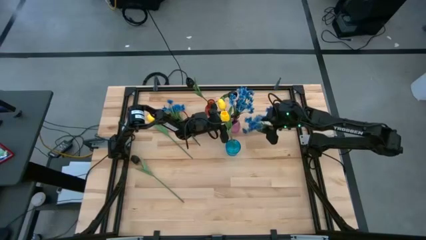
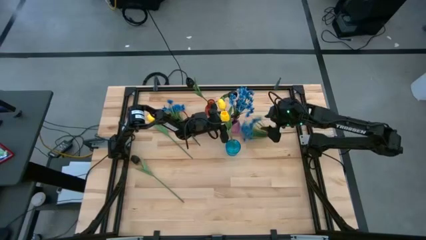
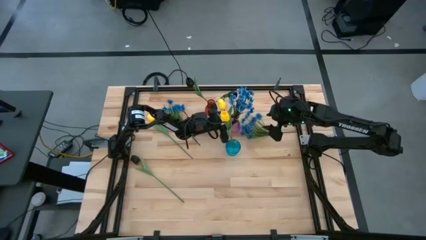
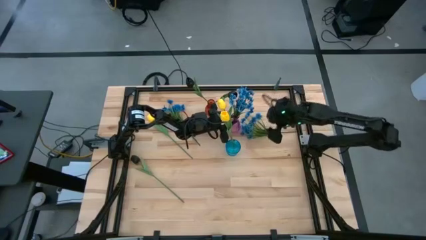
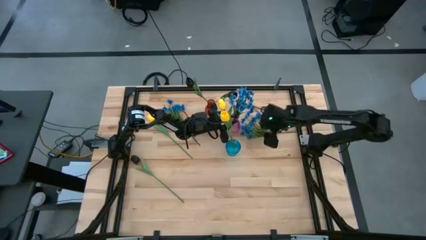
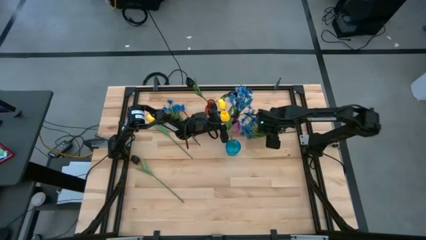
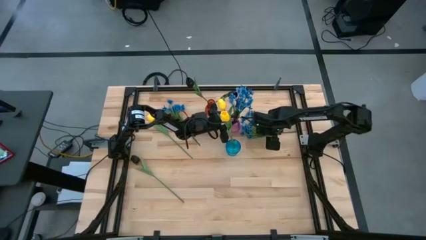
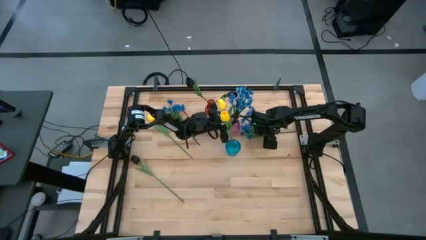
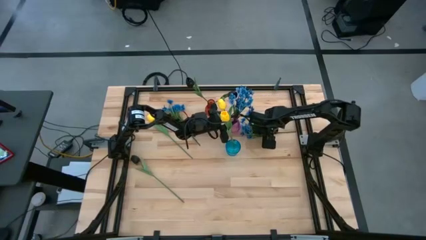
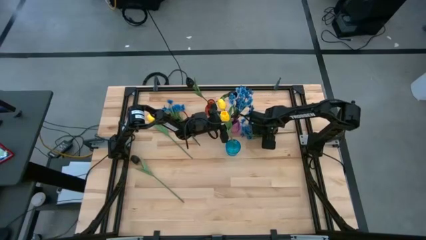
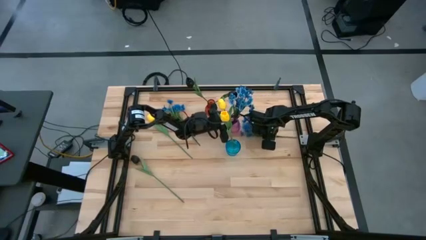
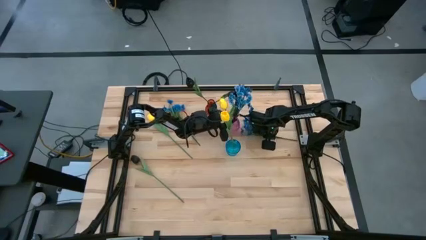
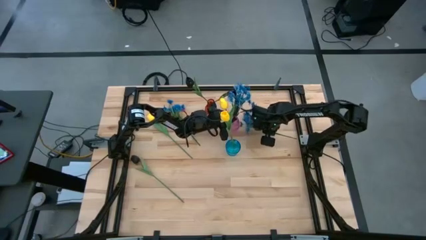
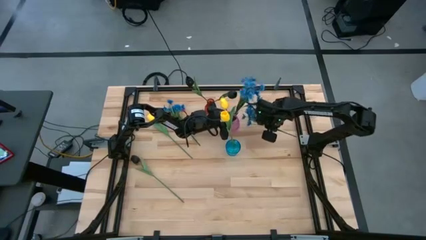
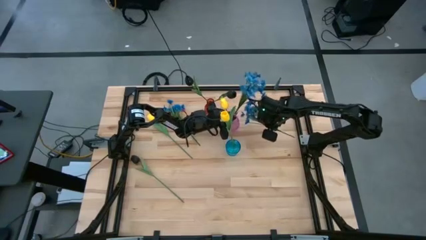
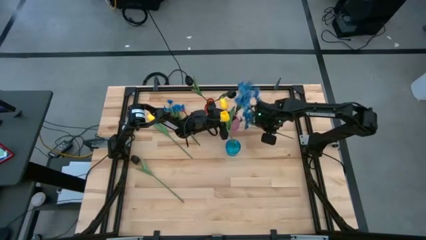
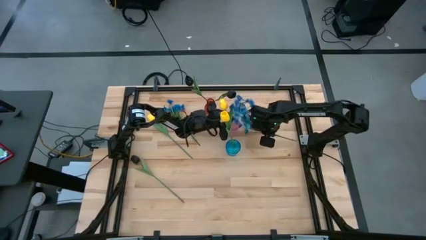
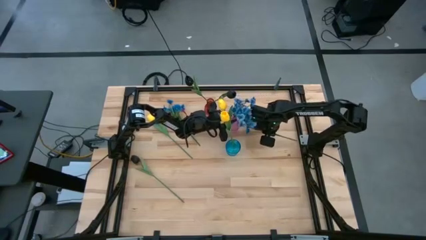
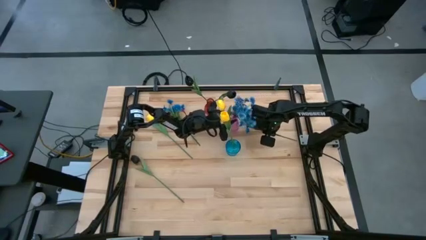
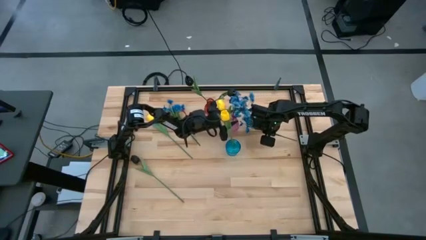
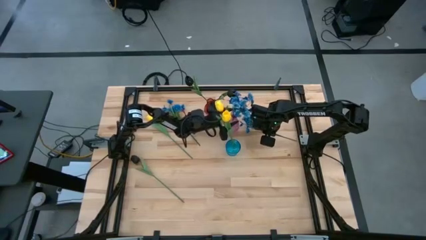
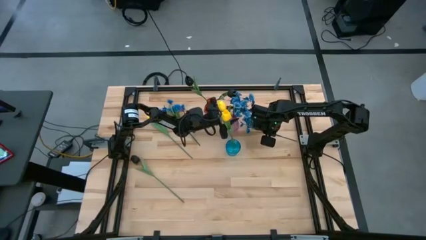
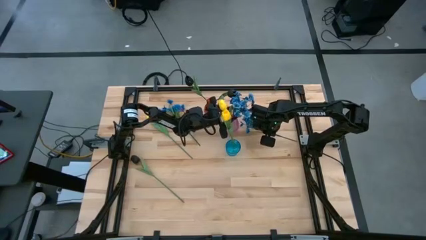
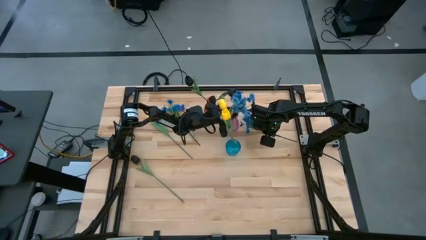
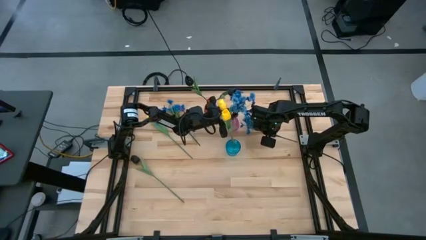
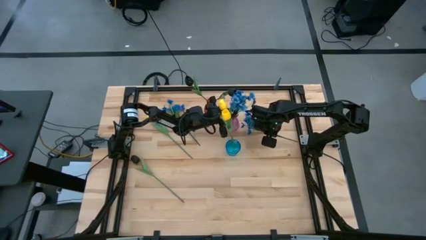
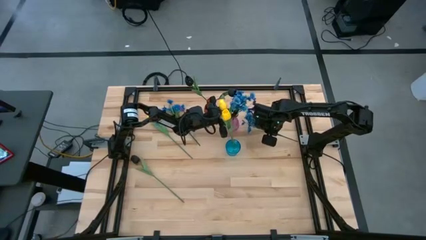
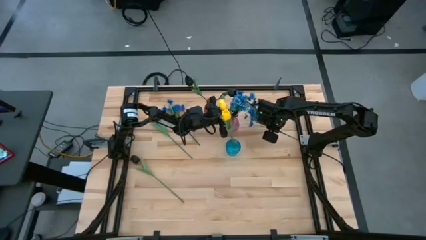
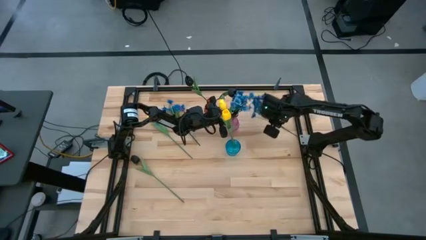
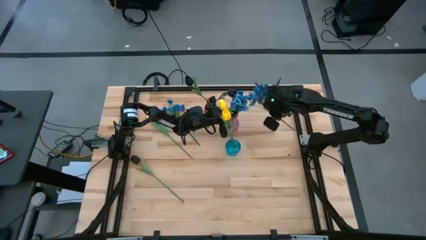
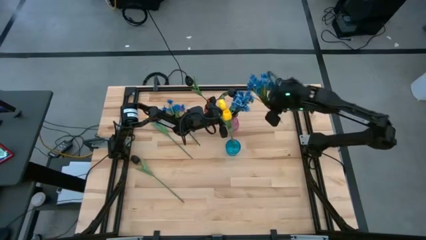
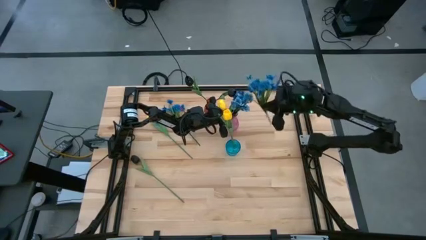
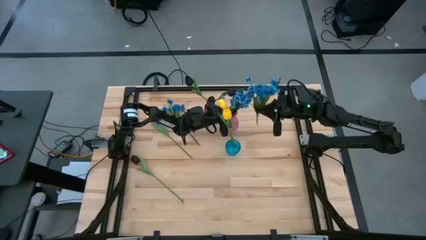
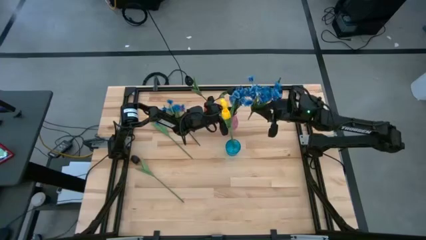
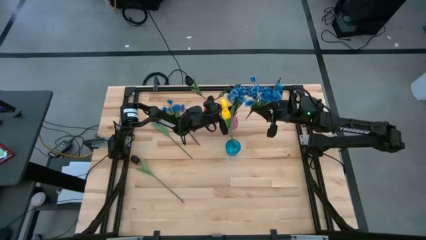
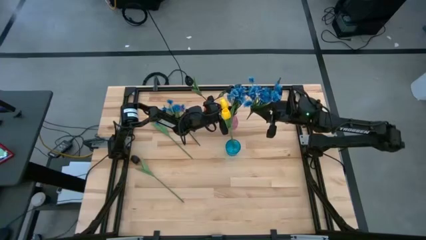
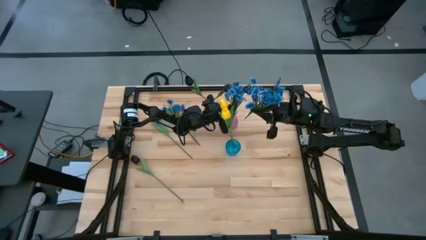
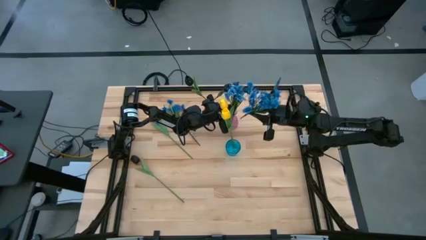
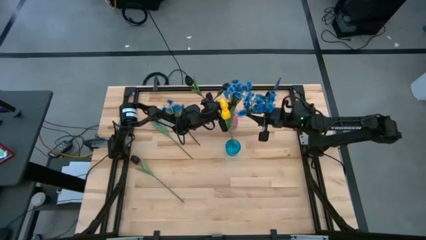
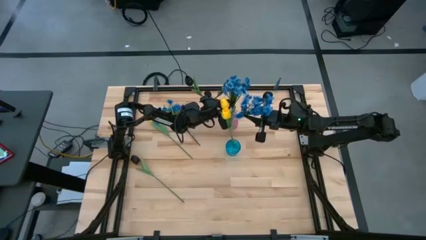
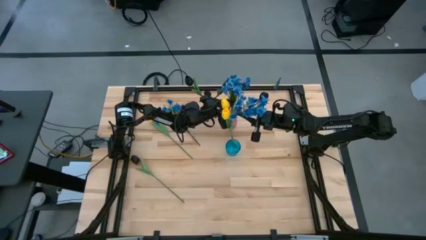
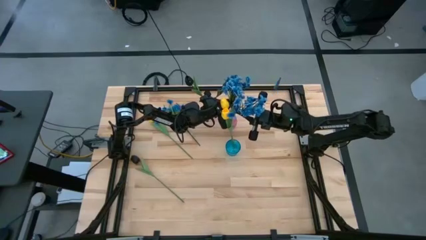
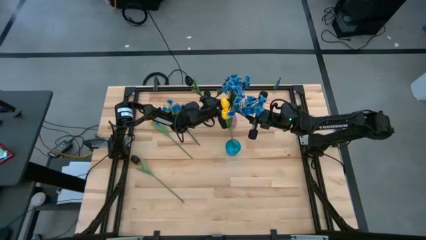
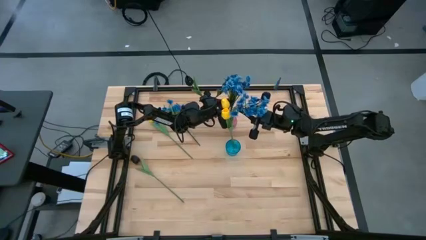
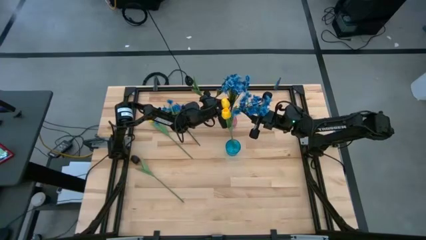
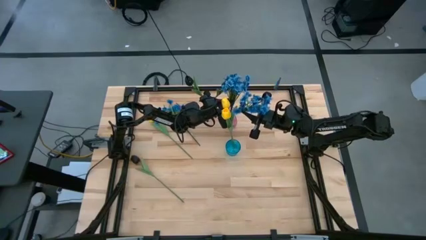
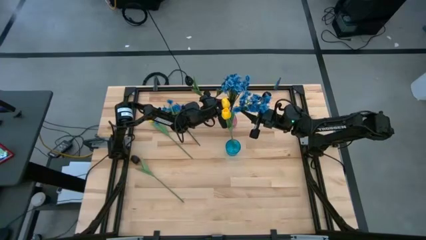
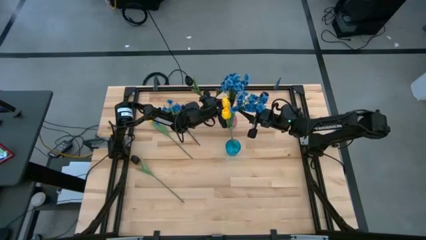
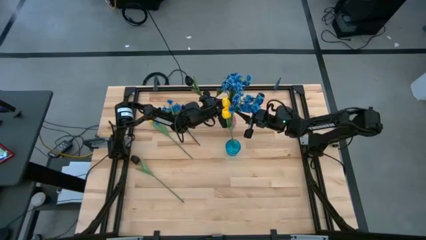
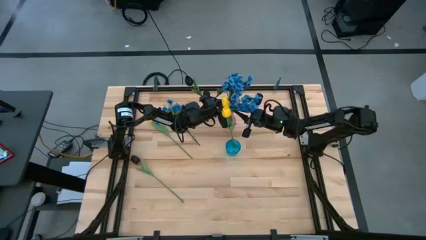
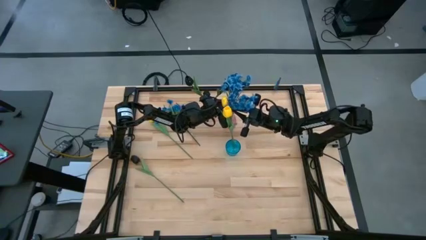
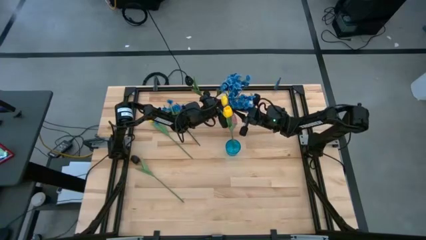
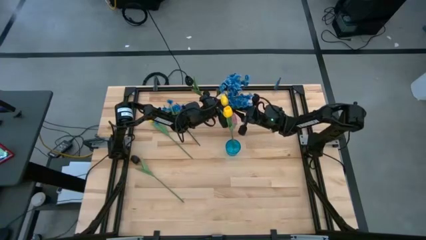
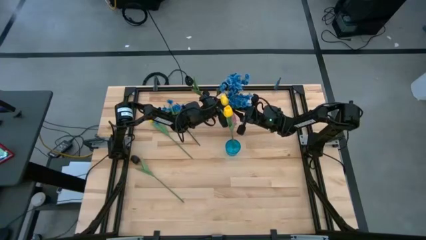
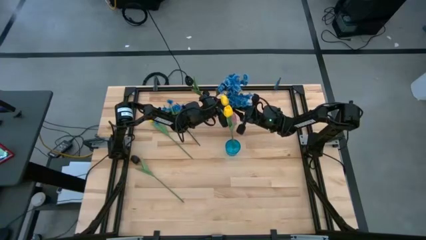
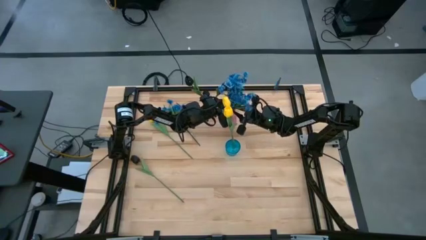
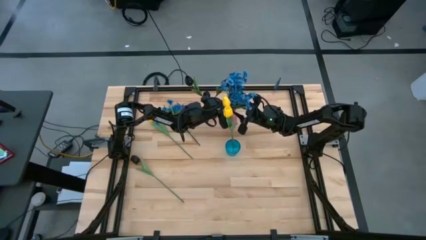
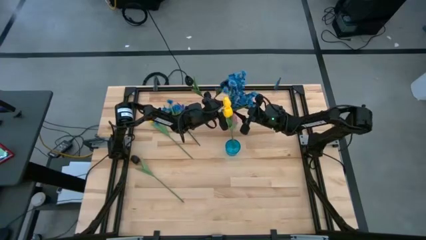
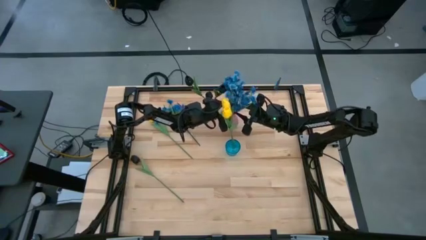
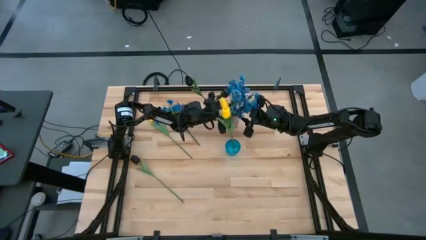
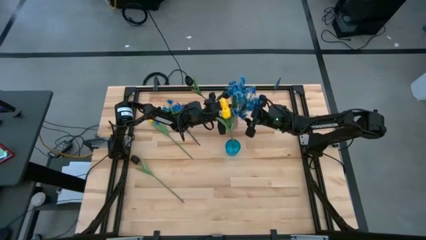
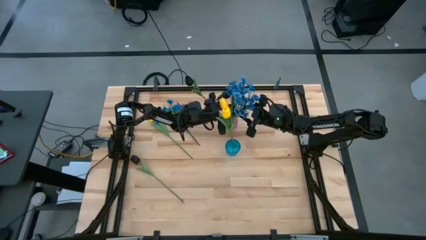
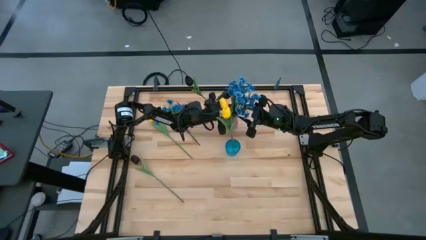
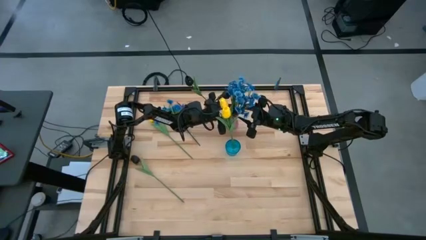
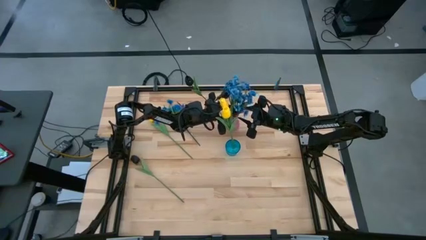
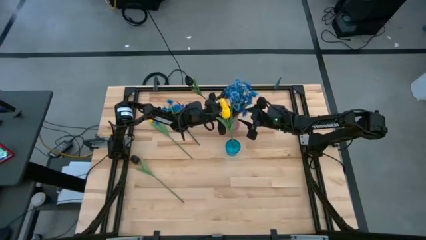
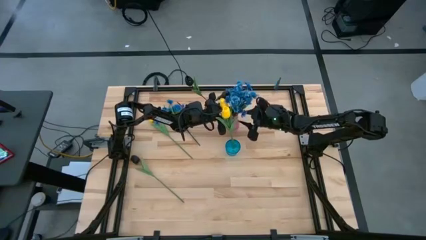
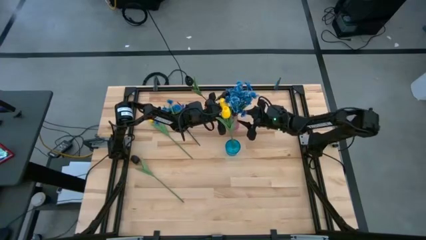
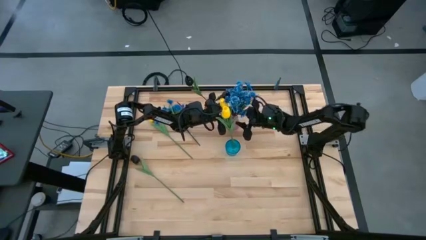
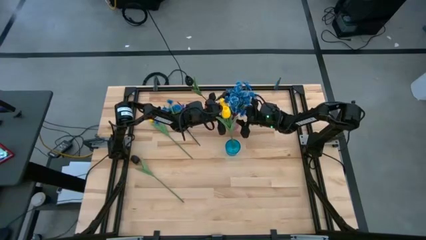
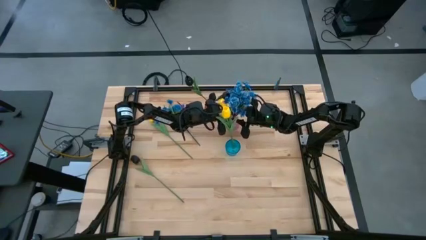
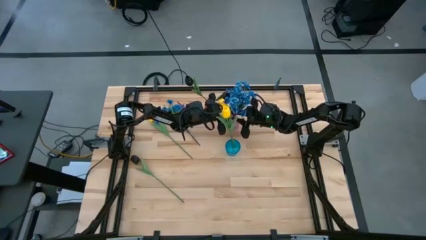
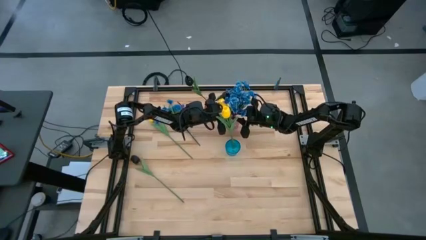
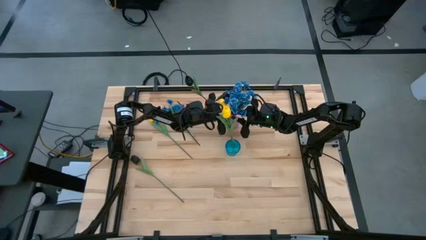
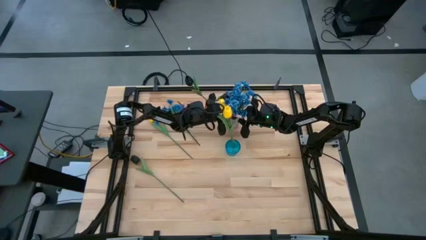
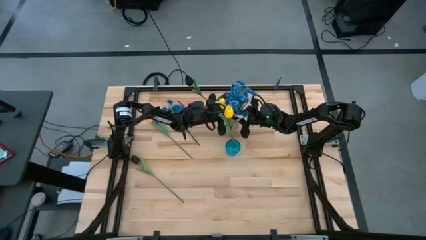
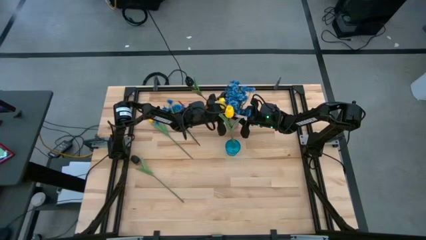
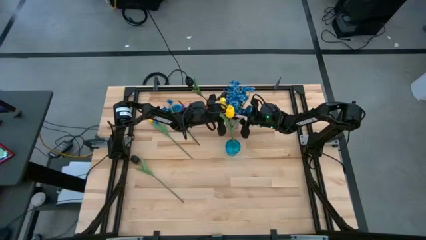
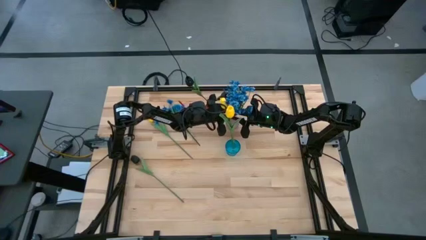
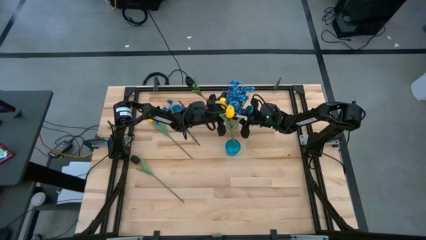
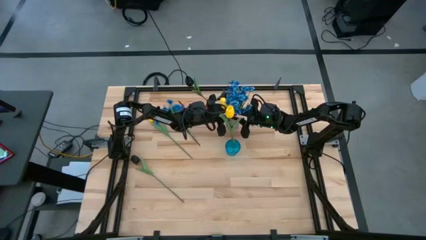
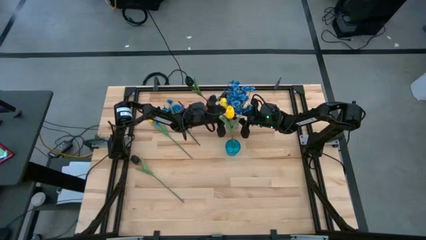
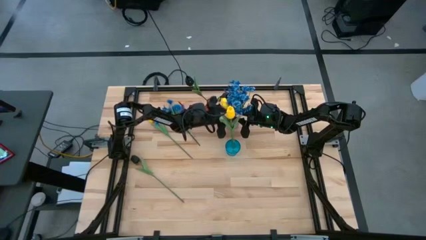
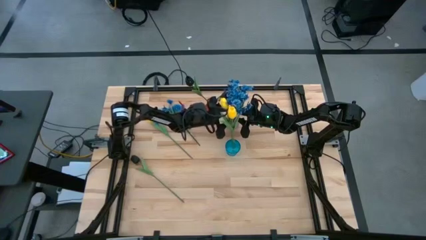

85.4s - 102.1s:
Task: Sort flowers into vase by color
Put the blue flowers into the pink vase

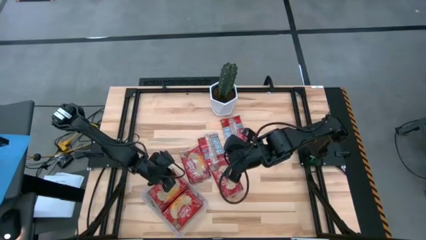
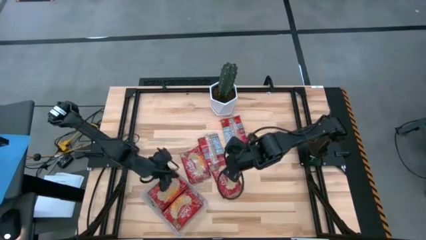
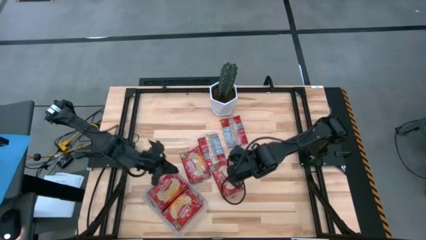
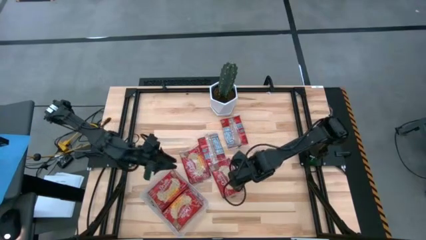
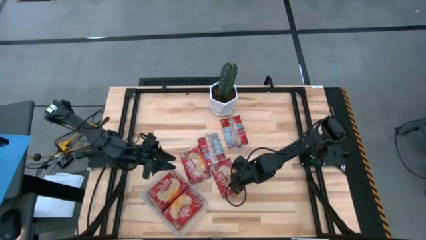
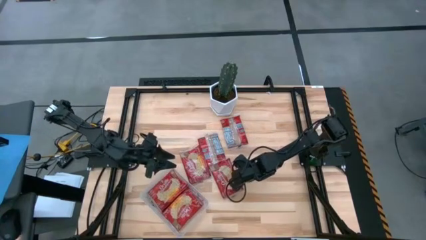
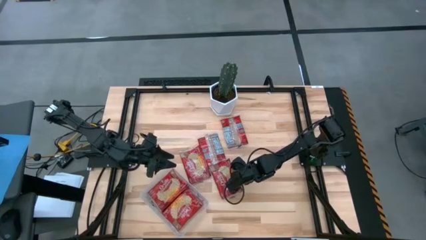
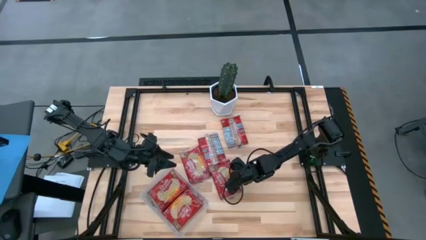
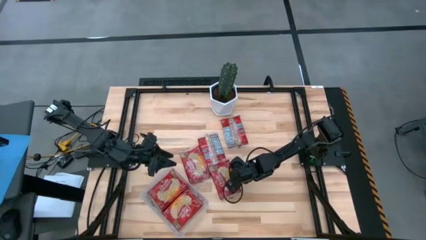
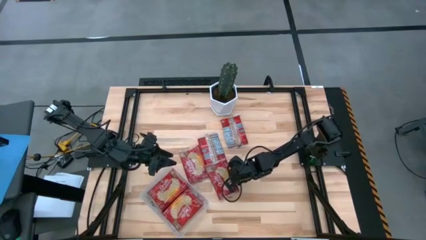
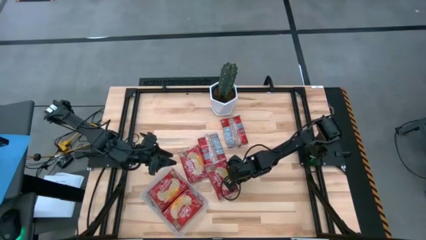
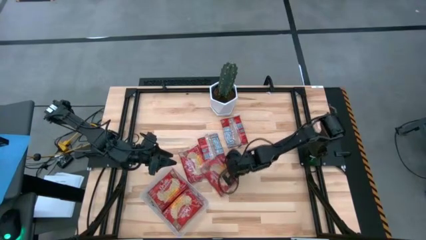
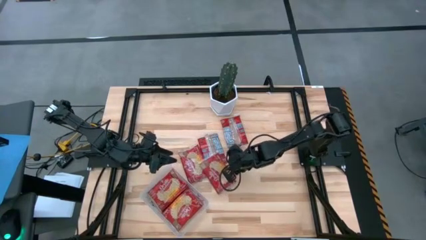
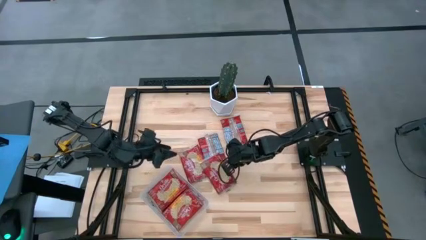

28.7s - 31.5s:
Task: Sort popcorn bags into baskets
Put the red popcorn bag into the transparent bin
